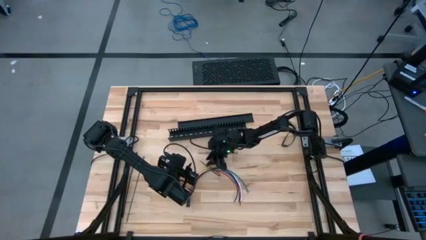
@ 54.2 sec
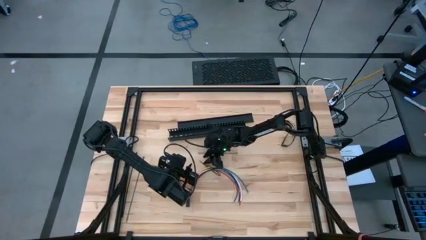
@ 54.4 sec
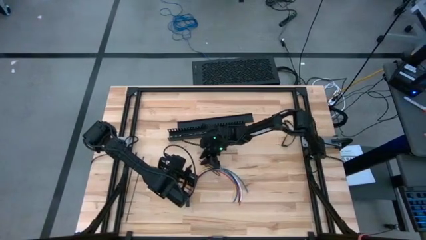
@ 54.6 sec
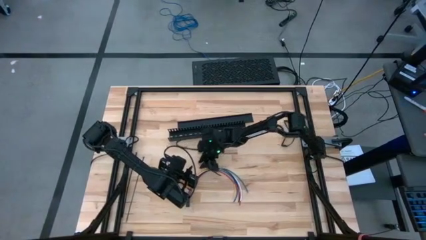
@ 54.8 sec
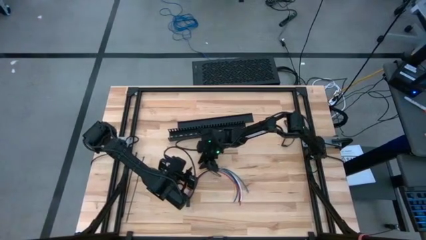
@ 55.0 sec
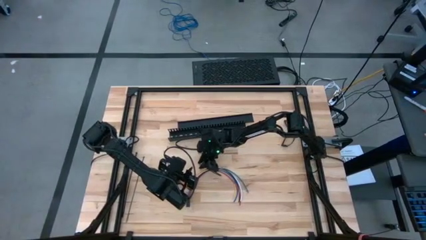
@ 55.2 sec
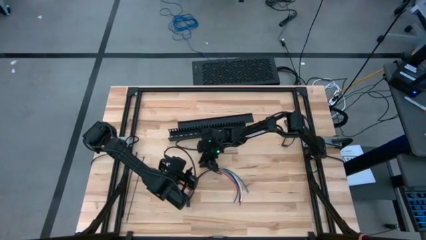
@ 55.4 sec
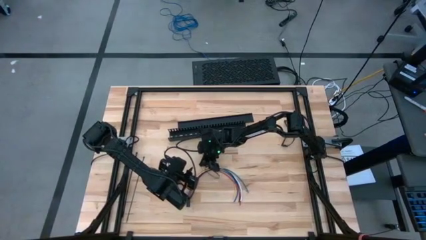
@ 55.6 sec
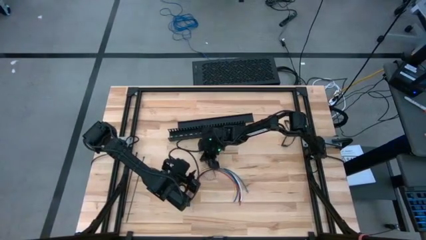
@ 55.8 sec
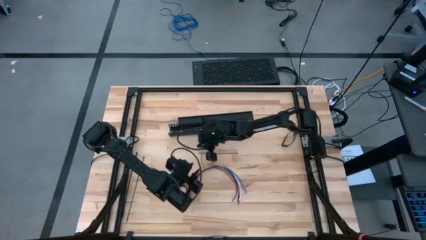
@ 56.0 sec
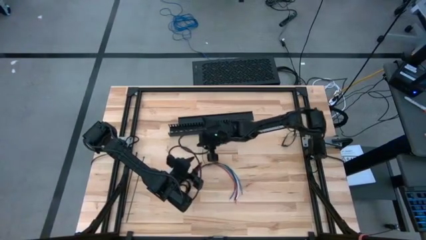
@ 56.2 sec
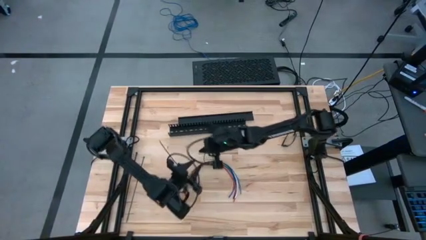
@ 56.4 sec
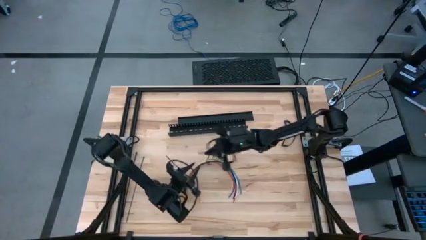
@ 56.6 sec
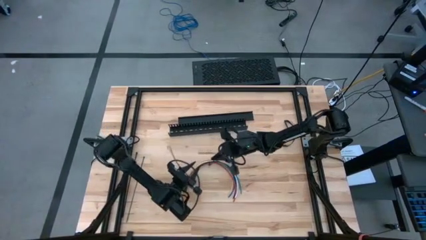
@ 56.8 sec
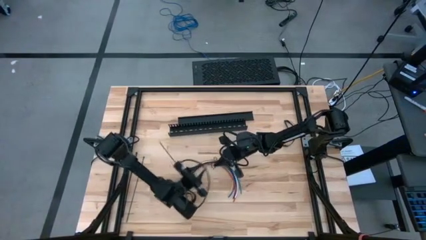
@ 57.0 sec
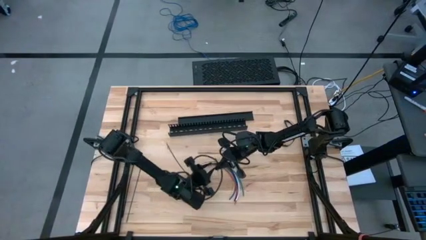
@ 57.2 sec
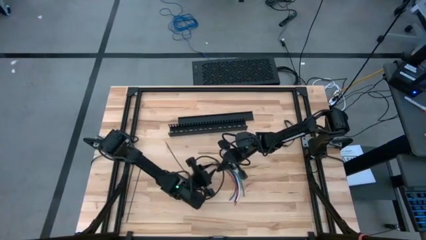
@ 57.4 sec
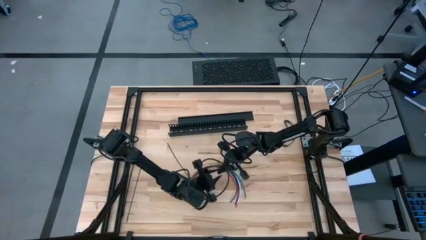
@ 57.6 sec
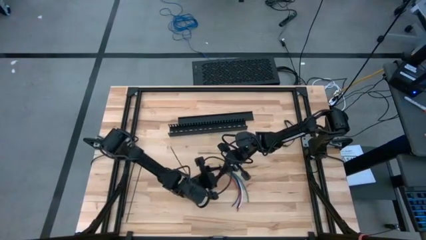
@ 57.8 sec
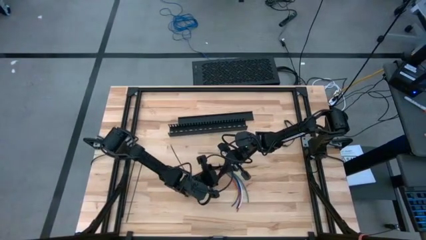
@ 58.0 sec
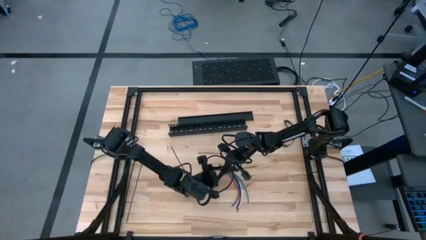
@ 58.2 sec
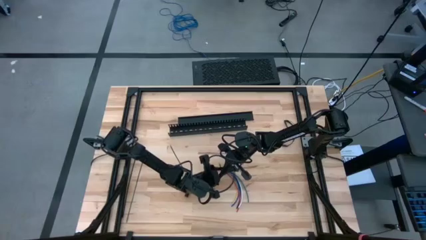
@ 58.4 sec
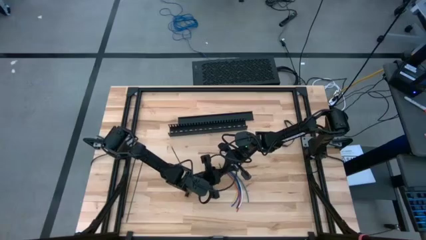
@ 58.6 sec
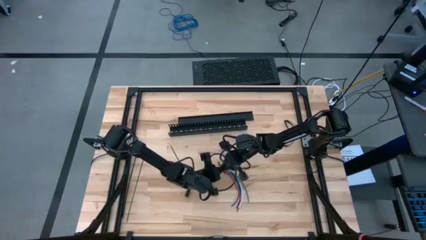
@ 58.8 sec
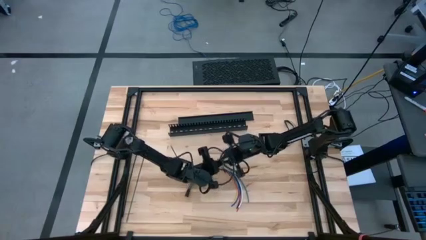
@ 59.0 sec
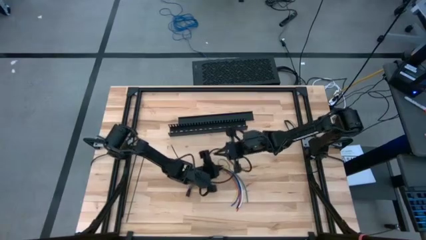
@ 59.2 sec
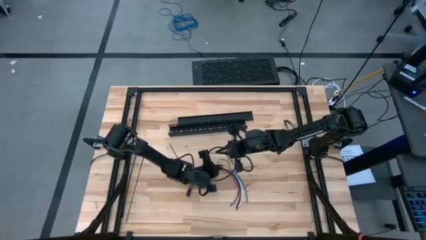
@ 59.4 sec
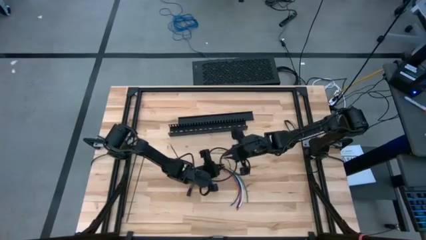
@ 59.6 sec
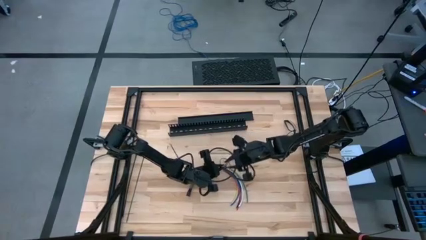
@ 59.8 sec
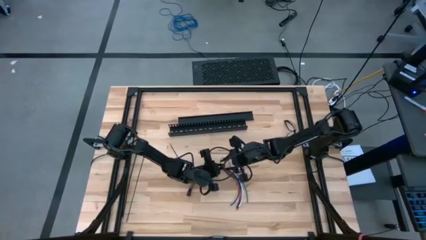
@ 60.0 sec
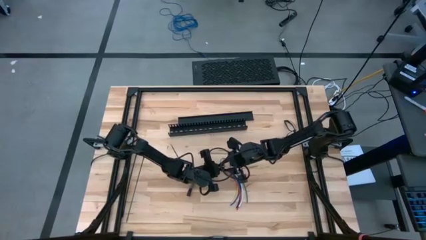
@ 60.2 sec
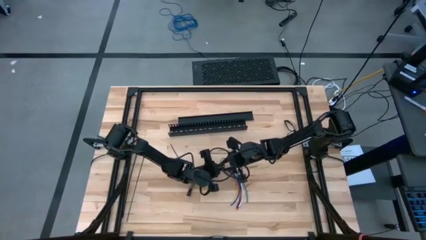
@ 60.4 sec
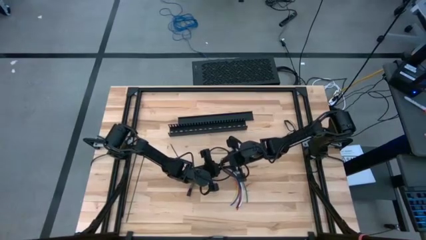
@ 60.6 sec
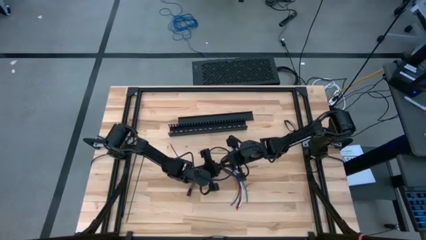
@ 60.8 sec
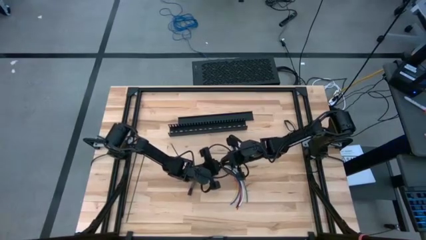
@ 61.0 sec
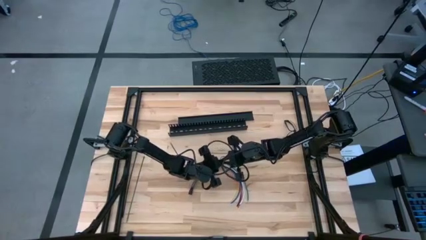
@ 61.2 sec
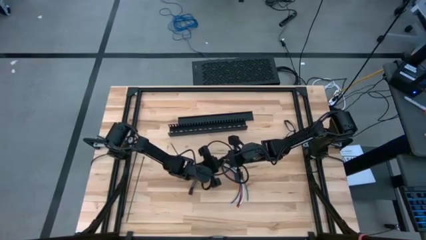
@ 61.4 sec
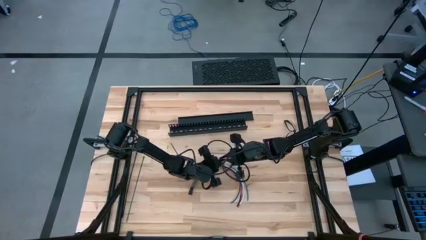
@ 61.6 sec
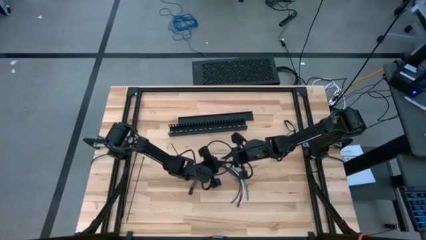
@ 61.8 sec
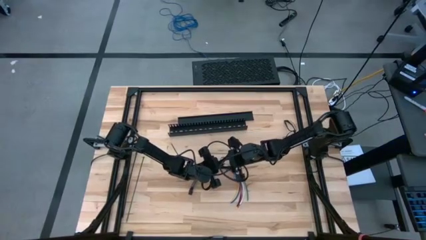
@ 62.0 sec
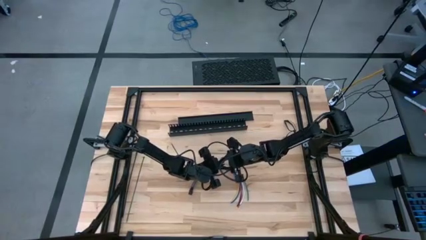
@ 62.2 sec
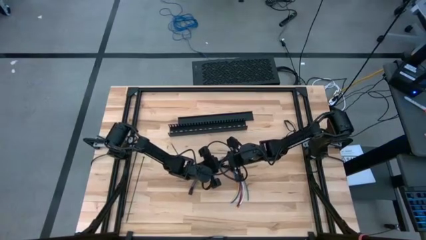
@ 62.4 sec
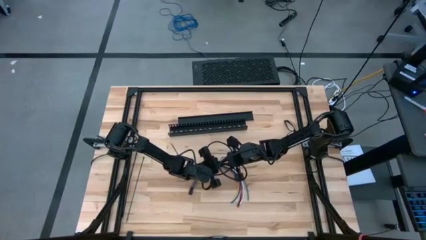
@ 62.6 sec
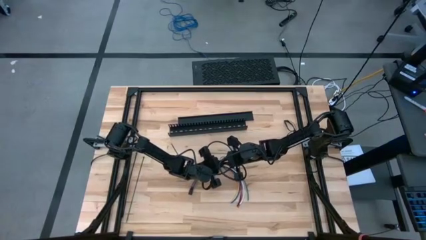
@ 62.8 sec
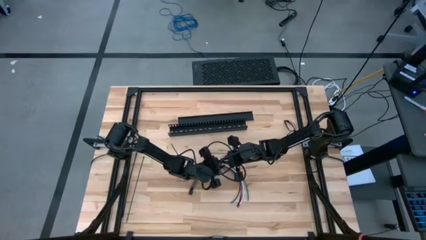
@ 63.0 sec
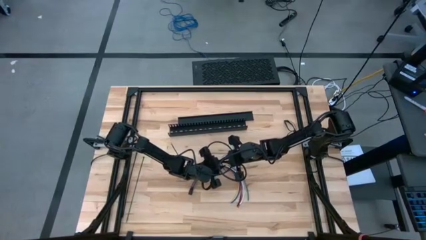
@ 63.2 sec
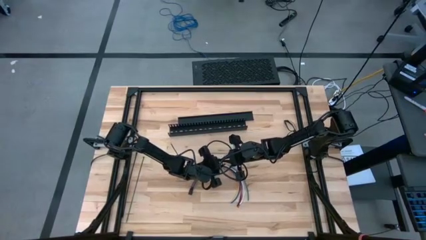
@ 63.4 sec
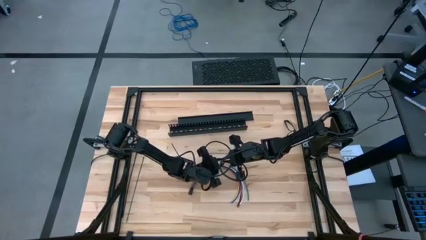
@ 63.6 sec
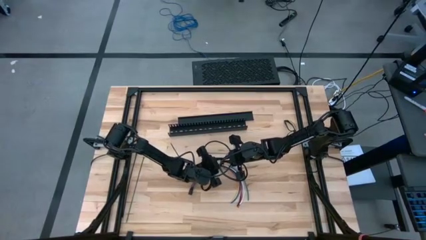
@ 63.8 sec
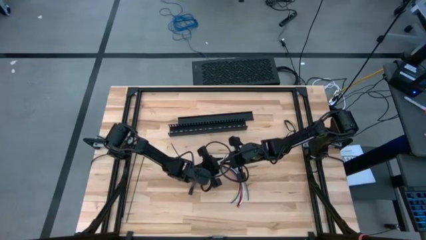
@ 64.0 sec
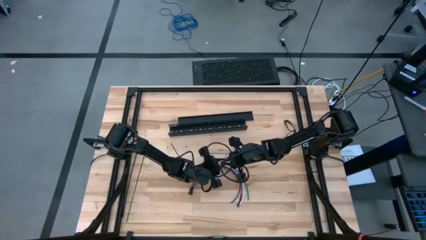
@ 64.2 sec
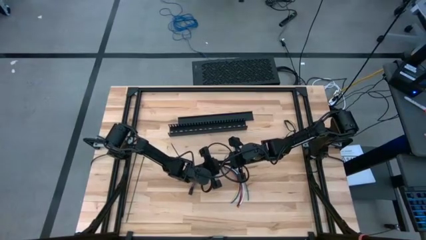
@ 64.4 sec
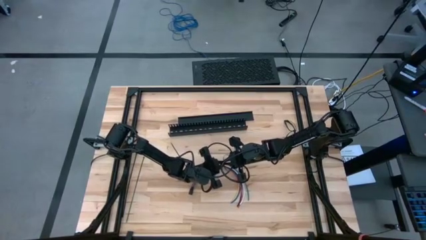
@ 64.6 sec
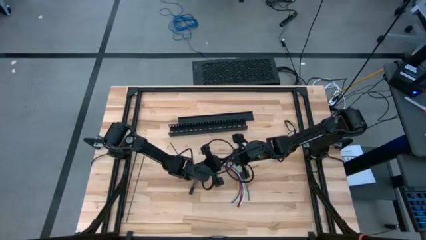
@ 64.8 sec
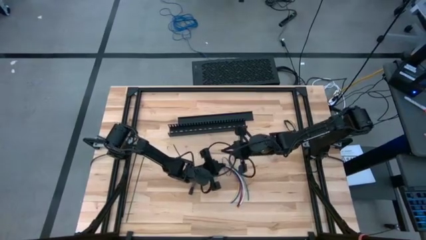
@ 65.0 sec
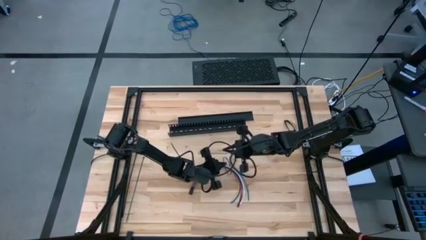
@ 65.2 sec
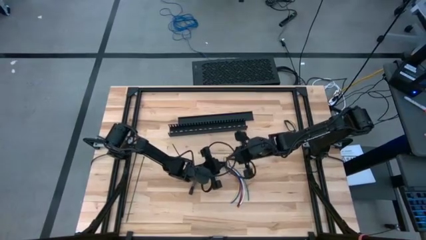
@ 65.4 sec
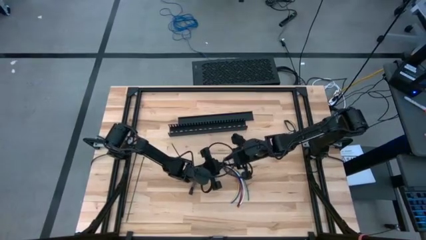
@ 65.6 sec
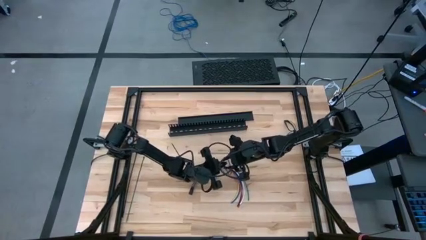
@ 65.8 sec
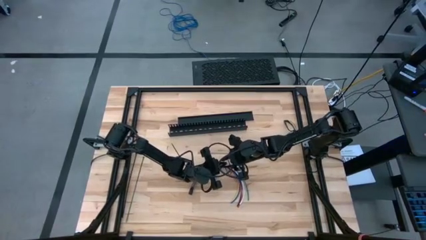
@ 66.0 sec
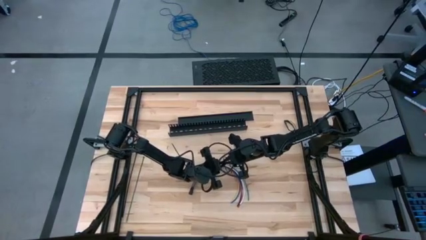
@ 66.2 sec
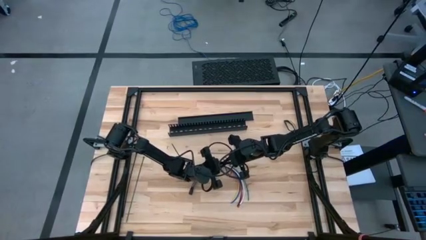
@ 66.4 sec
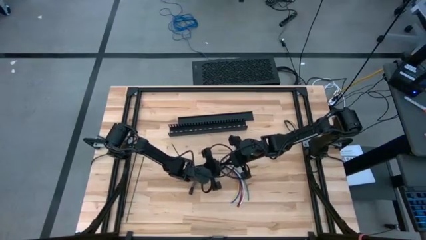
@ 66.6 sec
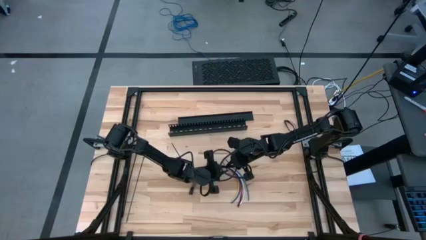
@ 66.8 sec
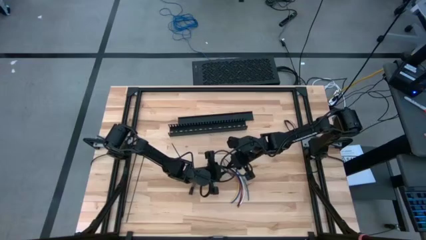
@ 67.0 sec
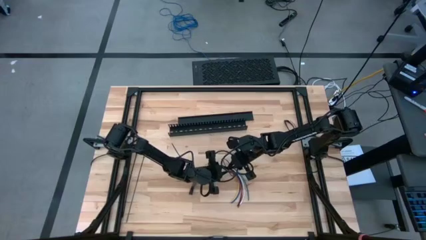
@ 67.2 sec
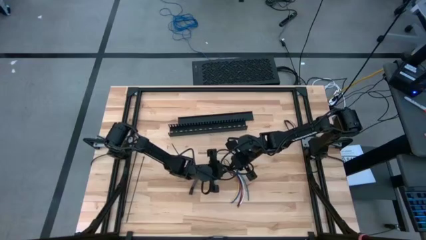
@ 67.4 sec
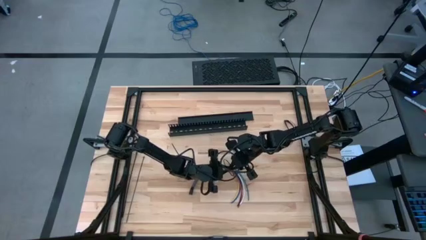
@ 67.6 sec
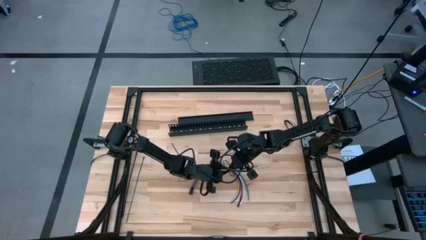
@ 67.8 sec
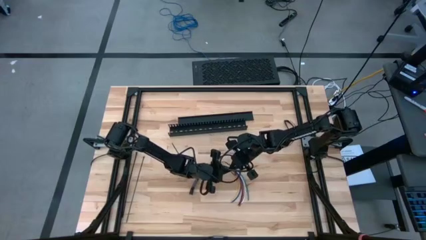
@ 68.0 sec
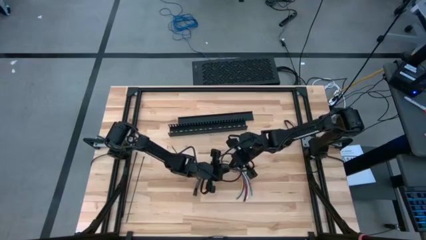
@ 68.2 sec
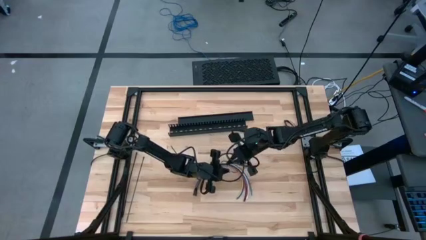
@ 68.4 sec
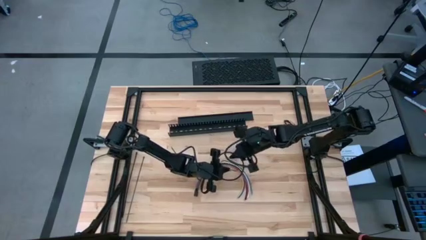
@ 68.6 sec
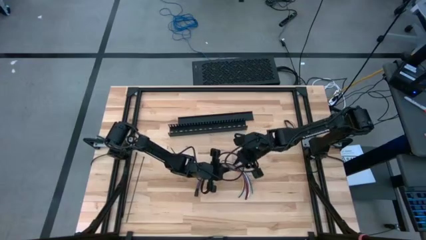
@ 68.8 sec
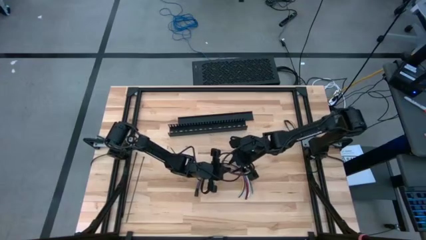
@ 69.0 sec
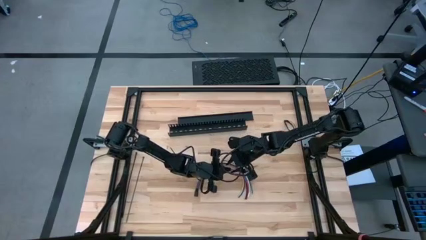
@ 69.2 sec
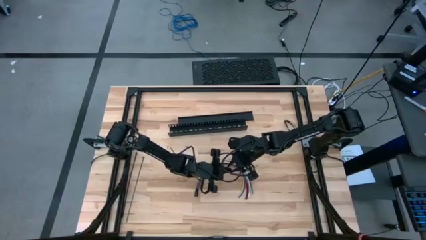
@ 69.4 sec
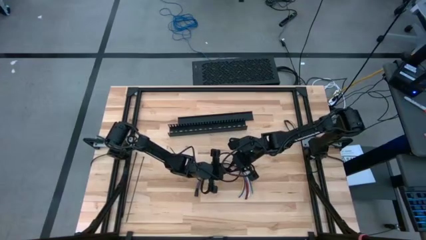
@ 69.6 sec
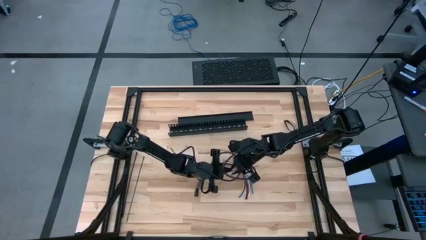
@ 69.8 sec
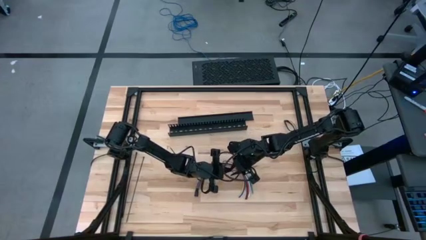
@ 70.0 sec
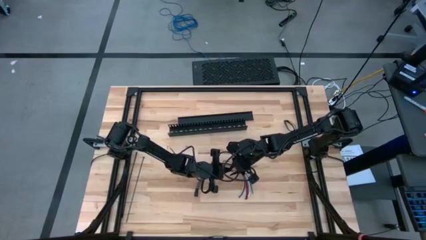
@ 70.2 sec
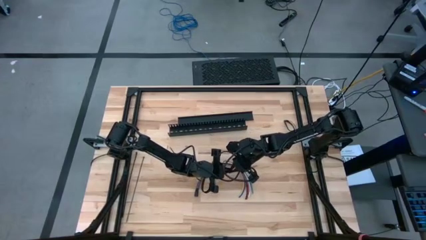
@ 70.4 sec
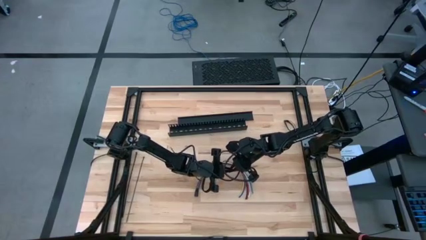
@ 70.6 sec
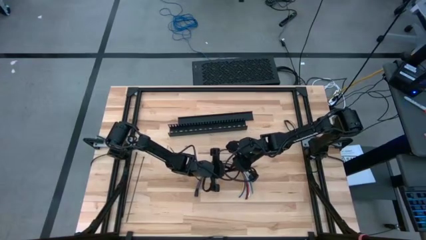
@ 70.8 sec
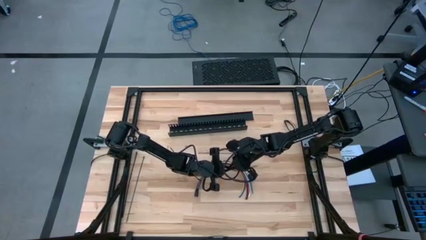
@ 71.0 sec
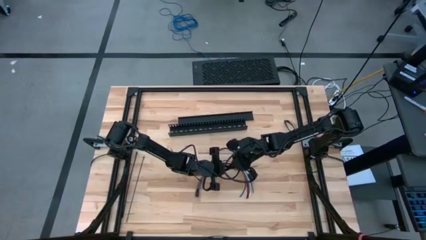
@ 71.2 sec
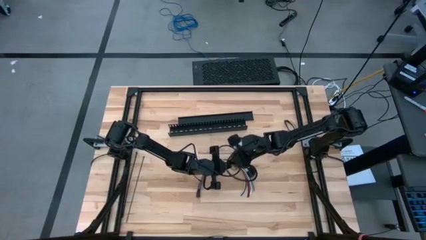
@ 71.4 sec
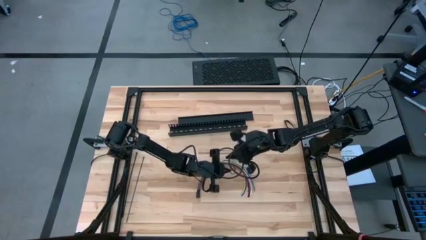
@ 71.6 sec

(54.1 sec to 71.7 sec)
Task: Ziptie cables
Wrap the cable wire using a zip tie
